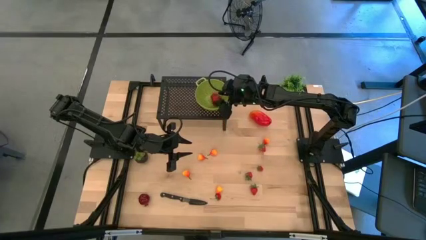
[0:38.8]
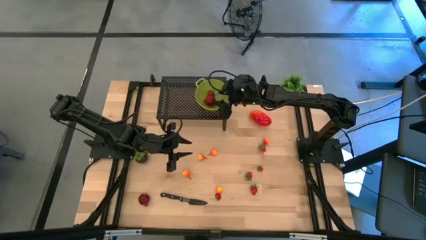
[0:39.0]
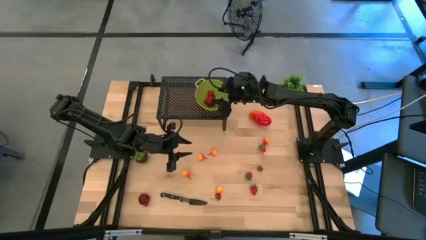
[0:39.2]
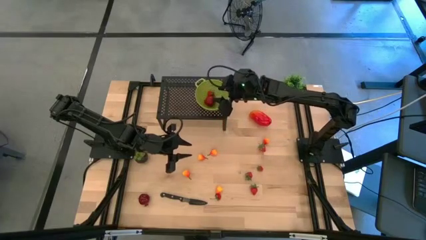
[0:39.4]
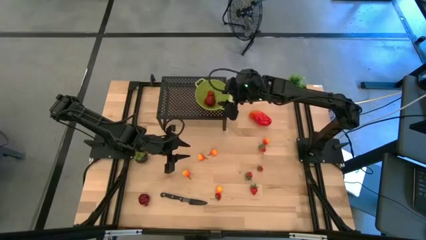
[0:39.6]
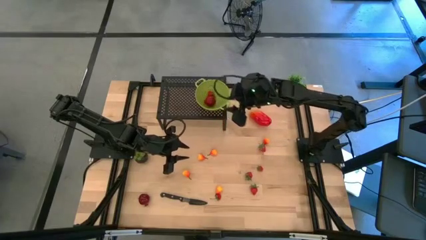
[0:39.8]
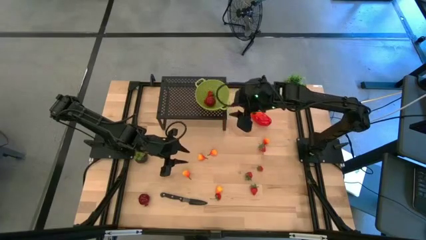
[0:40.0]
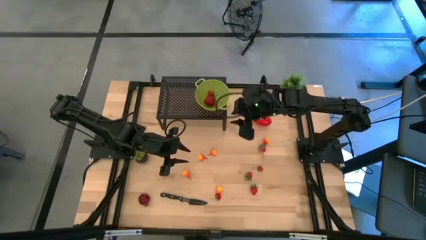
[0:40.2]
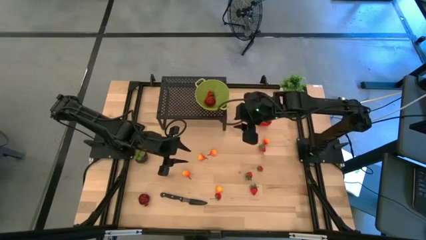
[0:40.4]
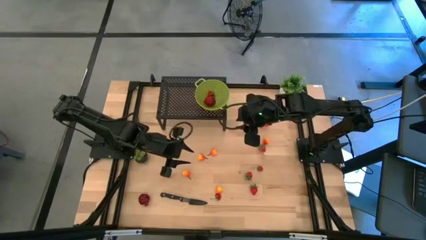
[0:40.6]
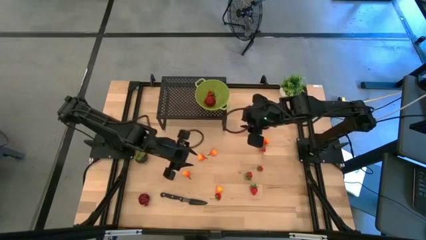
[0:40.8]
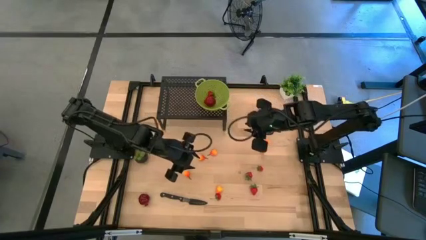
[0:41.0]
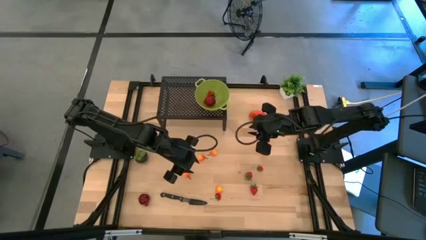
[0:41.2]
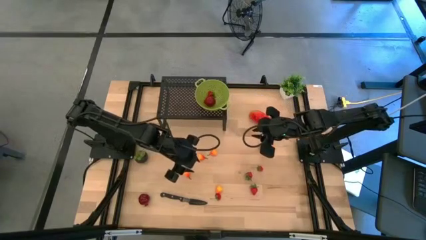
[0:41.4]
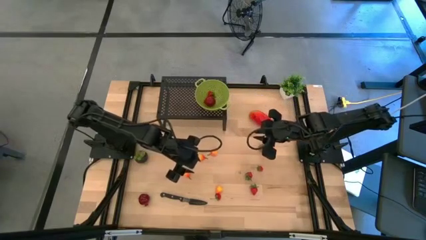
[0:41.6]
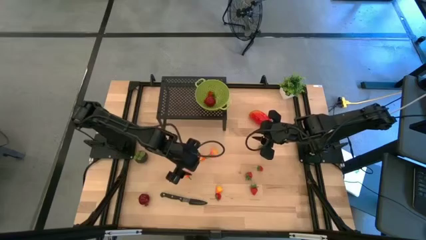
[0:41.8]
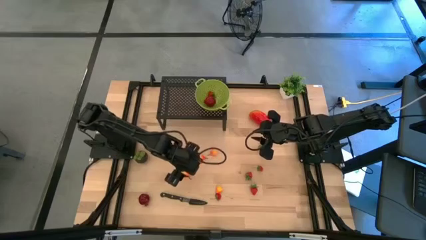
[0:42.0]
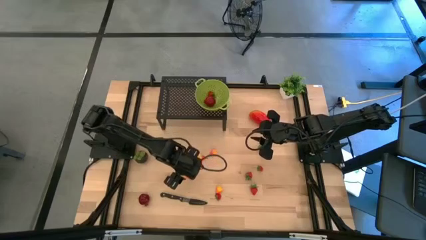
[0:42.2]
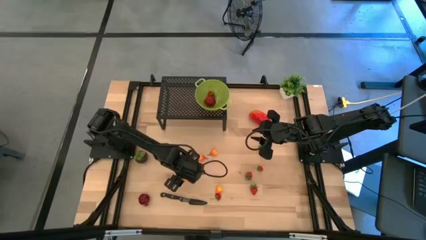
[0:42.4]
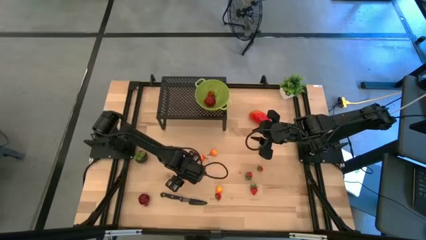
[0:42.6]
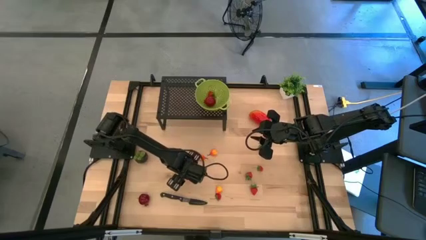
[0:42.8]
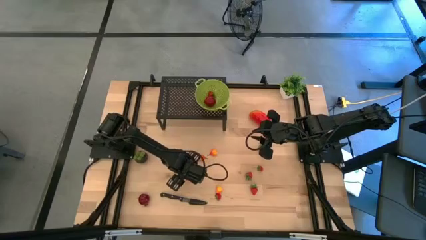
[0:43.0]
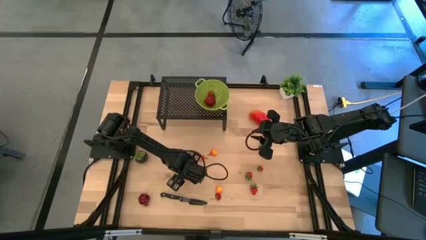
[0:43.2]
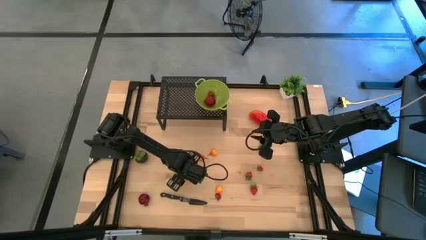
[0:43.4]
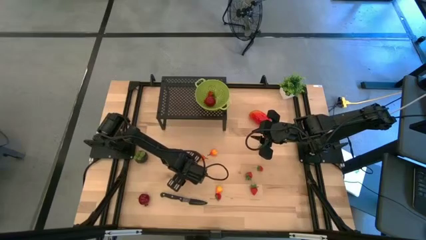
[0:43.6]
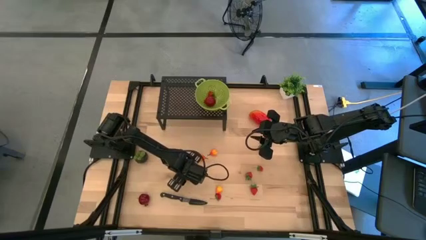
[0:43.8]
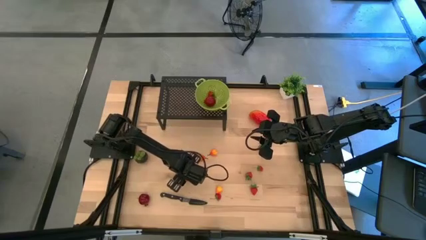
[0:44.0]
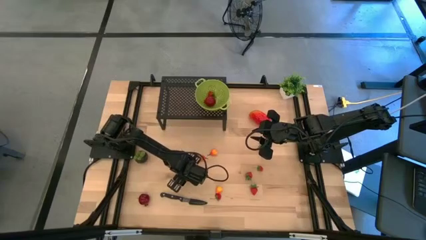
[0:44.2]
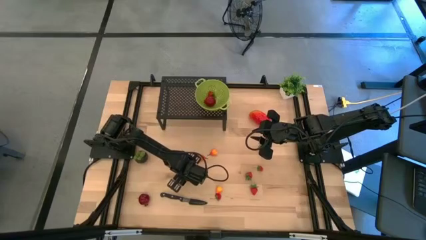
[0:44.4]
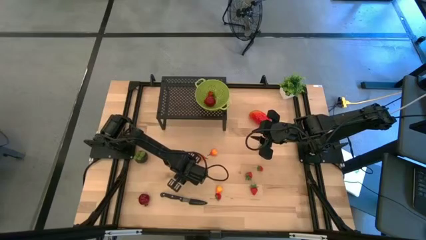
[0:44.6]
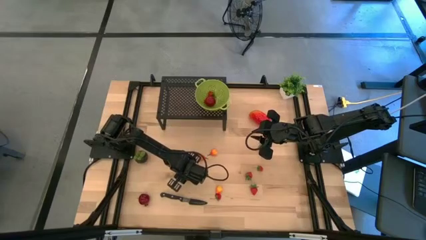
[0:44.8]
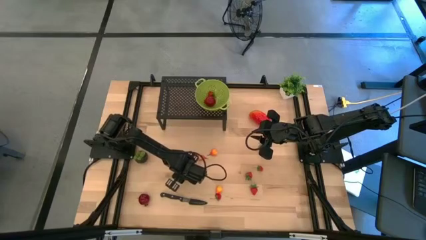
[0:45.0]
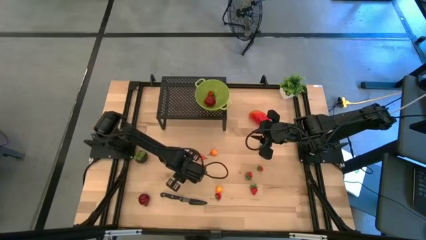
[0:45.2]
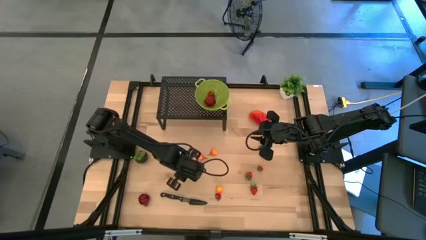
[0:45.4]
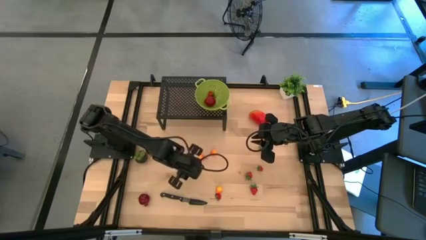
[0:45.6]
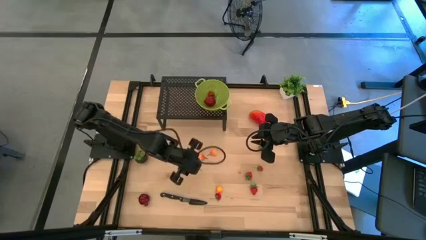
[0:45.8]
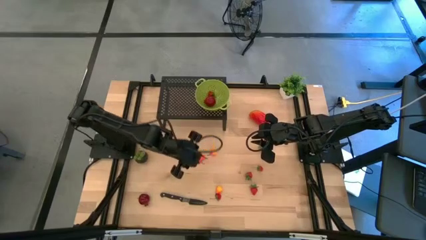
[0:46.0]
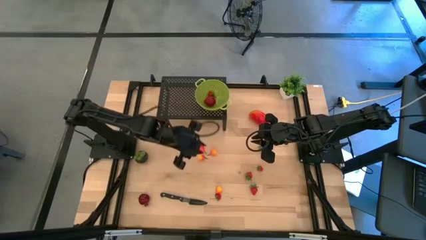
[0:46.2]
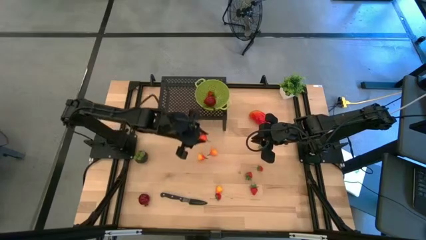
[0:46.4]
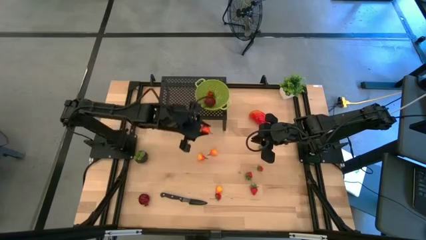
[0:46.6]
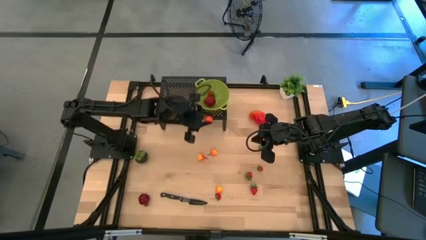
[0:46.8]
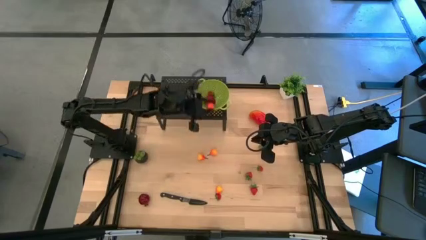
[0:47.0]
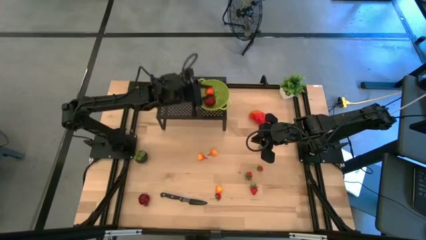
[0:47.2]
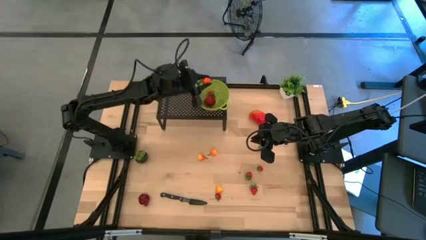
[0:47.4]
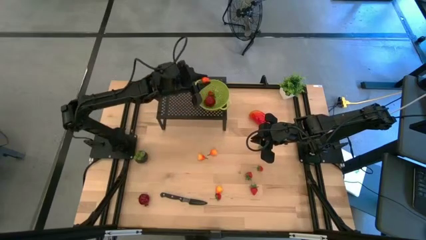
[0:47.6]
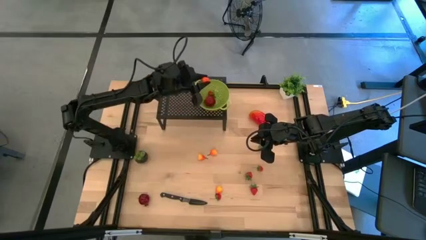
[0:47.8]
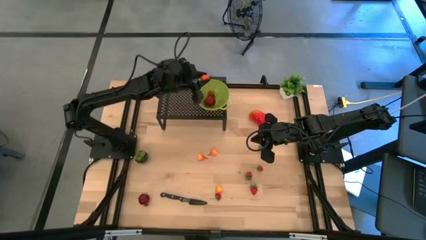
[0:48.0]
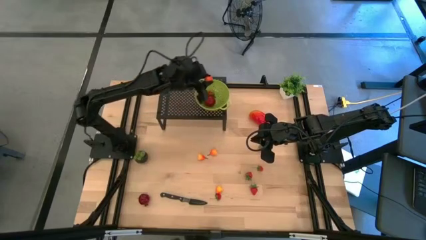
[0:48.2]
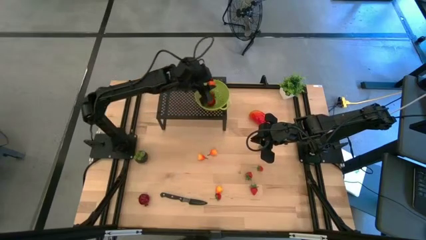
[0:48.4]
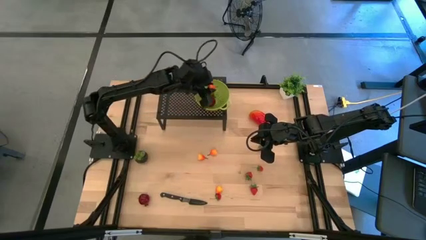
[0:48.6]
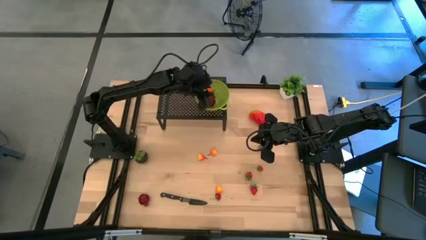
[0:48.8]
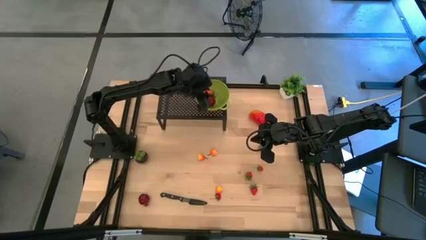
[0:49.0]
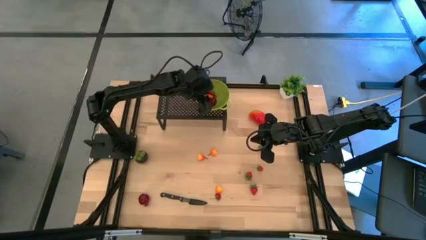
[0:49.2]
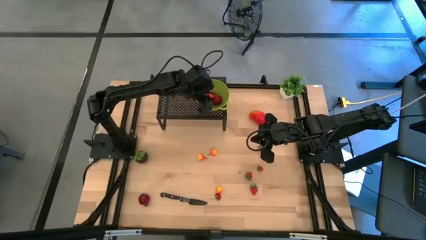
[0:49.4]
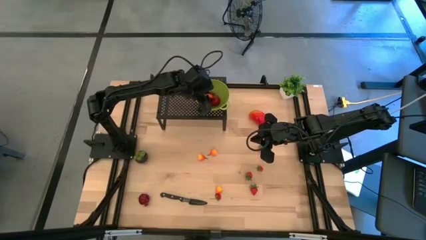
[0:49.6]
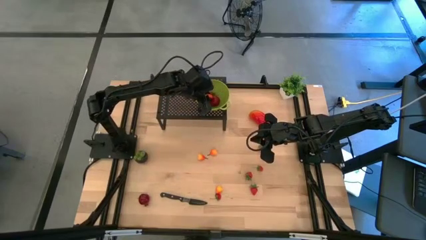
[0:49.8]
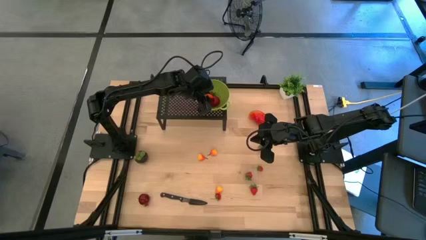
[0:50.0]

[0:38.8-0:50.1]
Task: Pick & Place Fruit
Put the pear into the green strainer bowl on the shelf

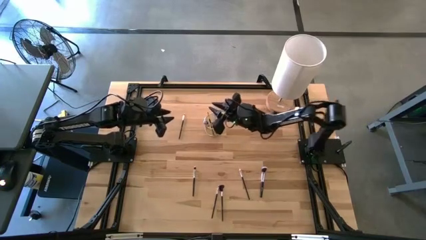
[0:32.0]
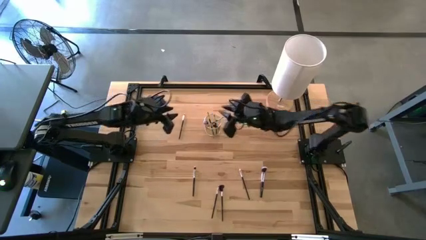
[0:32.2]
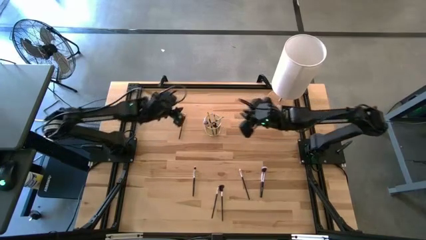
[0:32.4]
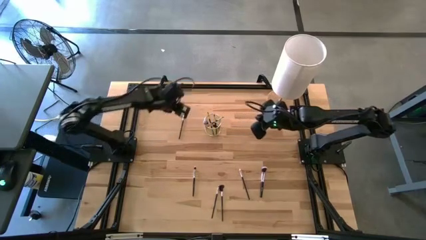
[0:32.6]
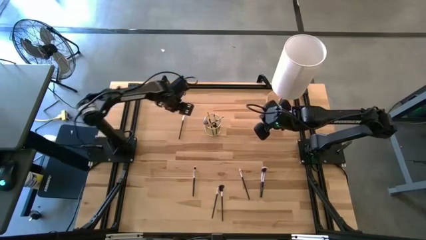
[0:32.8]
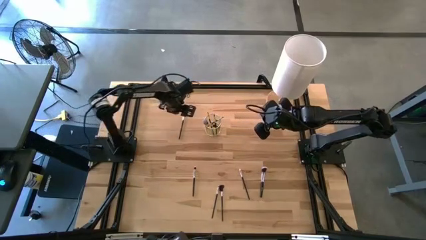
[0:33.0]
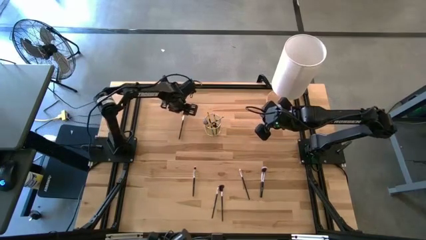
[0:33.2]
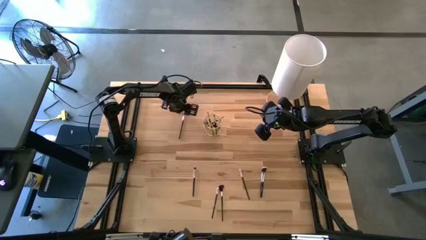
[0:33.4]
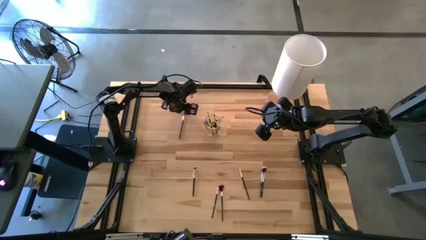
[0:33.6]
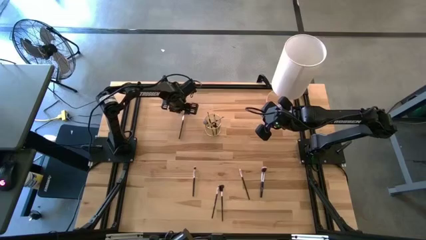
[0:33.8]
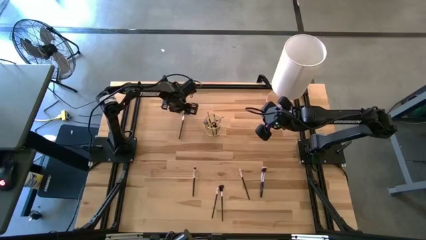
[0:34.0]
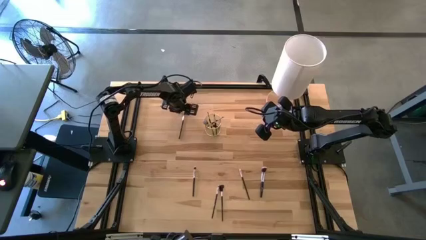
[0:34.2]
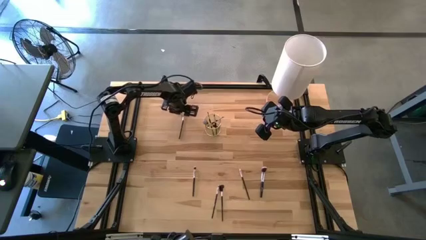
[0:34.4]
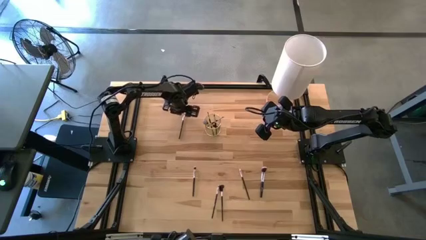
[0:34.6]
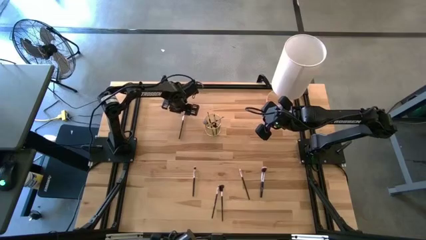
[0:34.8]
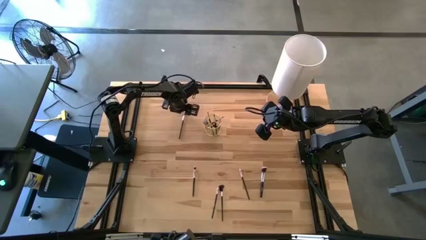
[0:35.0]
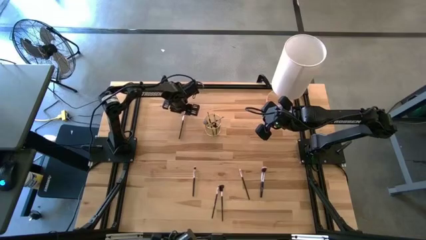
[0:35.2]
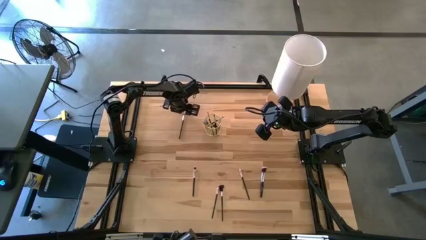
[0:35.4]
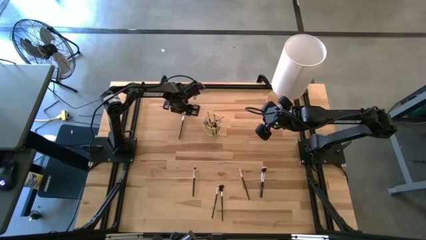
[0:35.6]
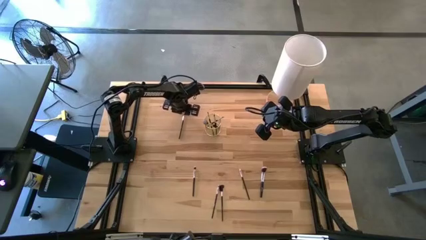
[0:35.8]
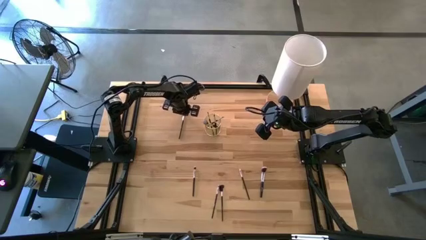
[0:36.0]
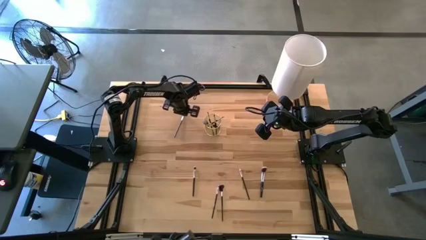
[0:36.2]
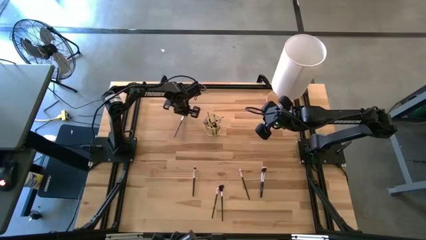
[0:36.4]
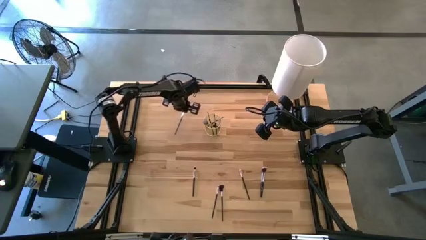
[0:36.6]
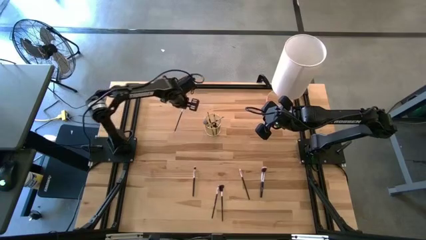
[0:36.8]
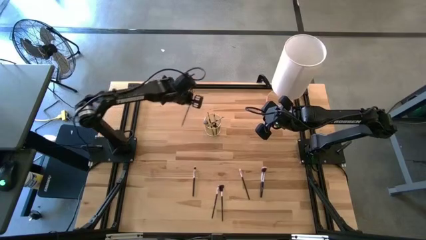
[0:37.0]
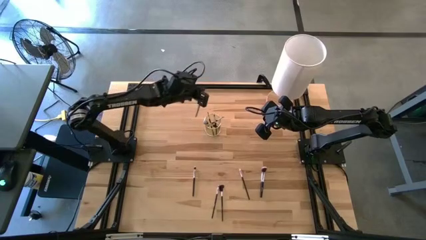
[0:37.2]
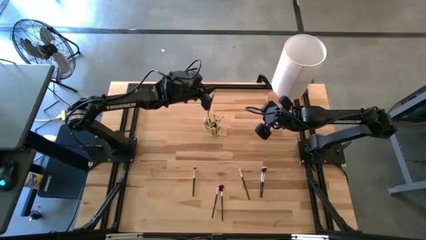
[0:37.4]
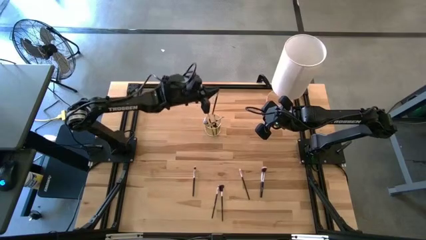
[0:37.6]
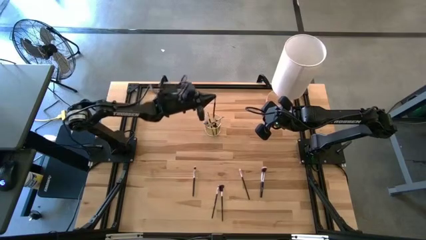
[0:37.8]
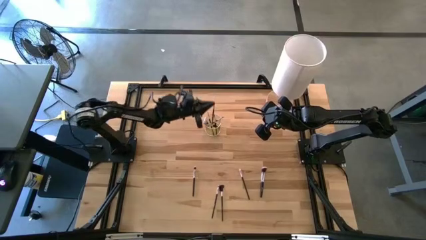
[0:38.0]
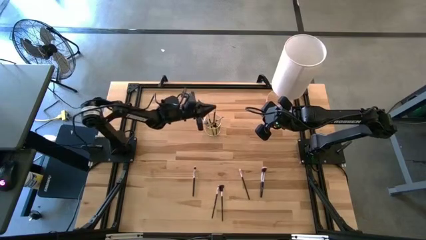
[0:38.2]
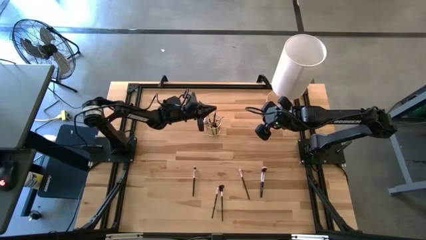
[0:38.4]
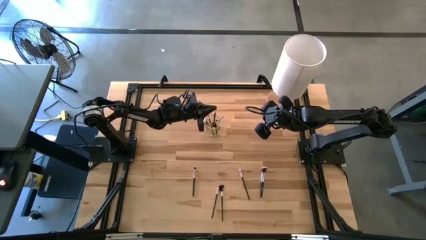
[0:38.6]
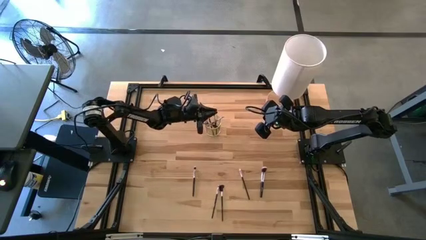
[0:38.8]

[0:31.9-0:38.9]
Task: Put items in baskets/containers
Put the black eyeshadow brush into the gold container
